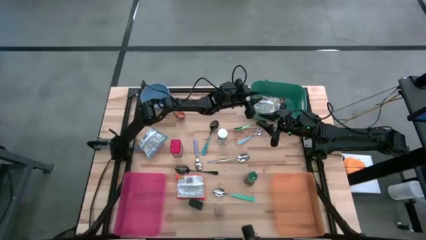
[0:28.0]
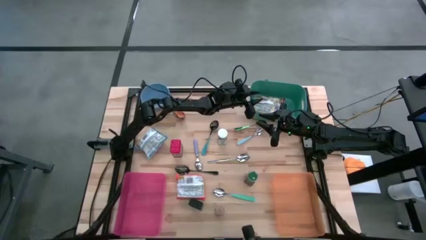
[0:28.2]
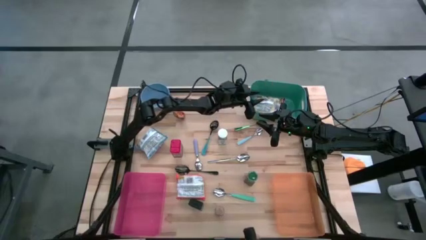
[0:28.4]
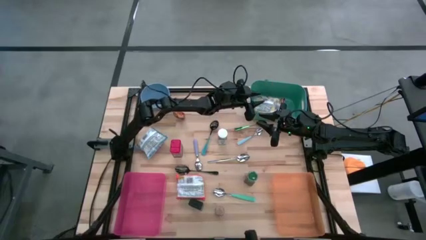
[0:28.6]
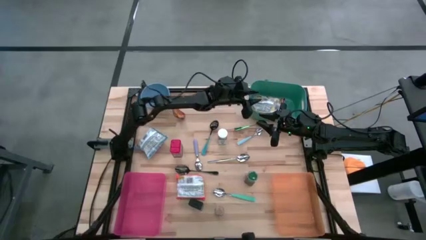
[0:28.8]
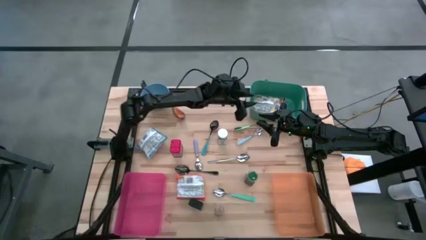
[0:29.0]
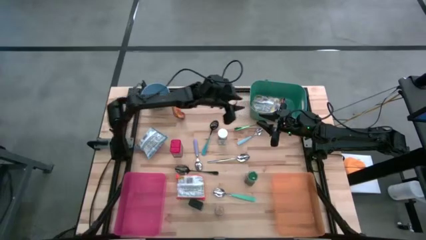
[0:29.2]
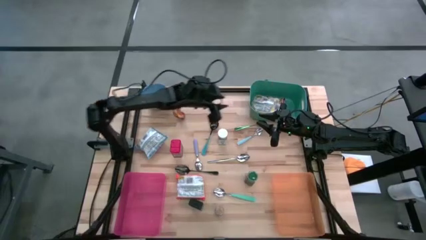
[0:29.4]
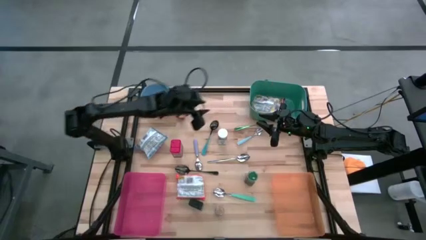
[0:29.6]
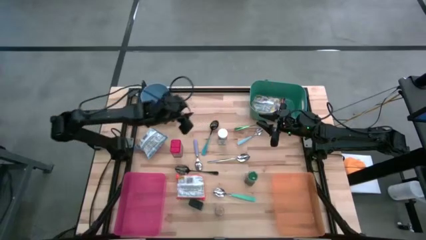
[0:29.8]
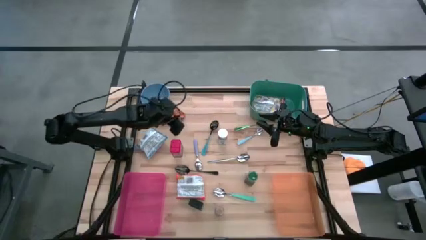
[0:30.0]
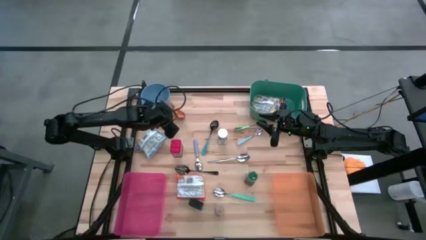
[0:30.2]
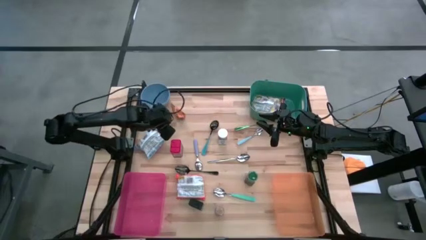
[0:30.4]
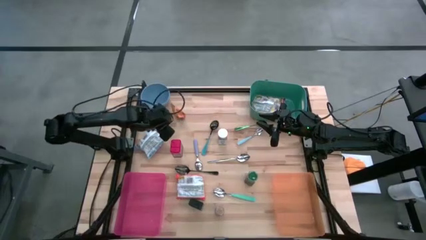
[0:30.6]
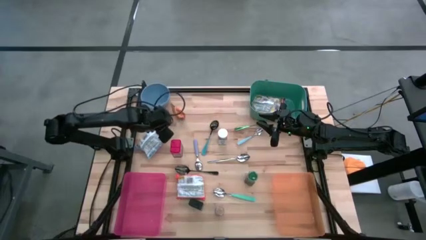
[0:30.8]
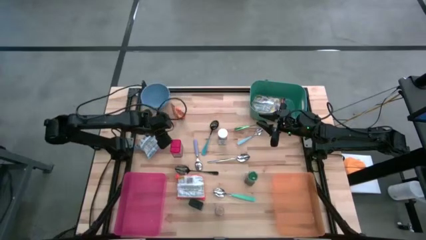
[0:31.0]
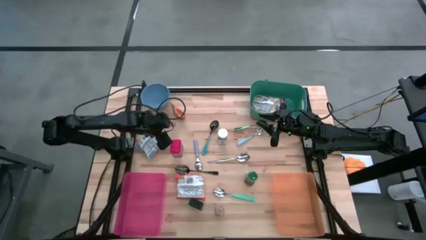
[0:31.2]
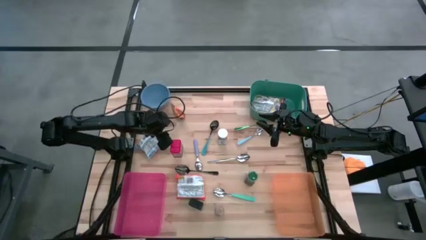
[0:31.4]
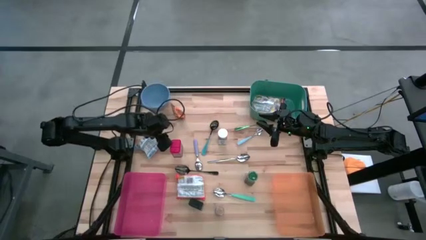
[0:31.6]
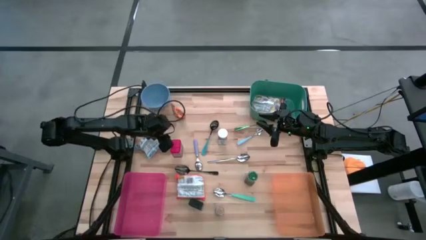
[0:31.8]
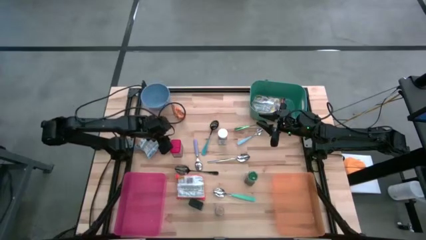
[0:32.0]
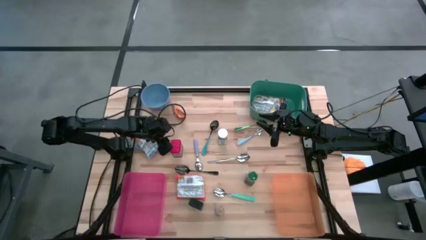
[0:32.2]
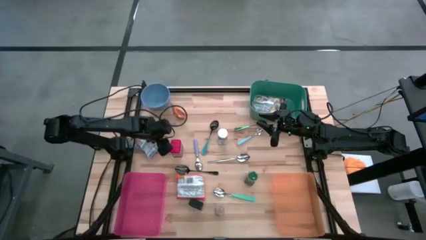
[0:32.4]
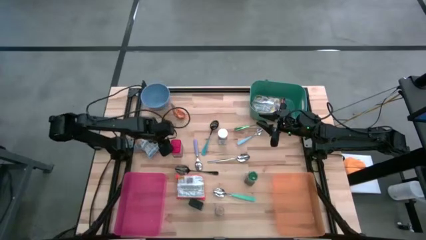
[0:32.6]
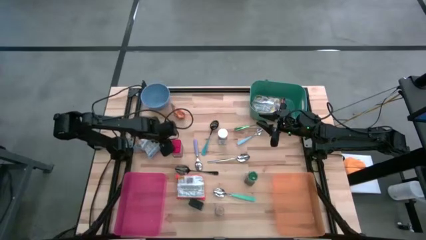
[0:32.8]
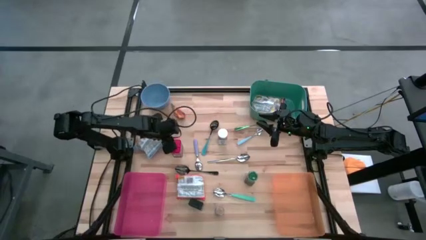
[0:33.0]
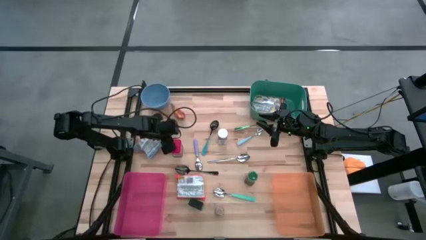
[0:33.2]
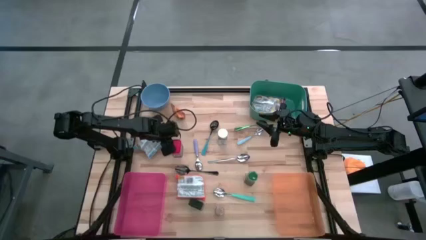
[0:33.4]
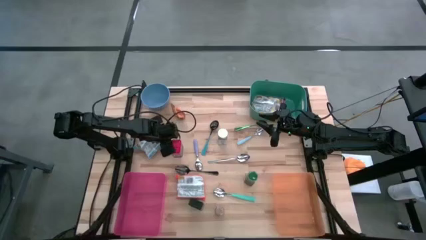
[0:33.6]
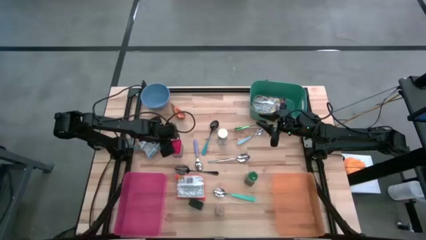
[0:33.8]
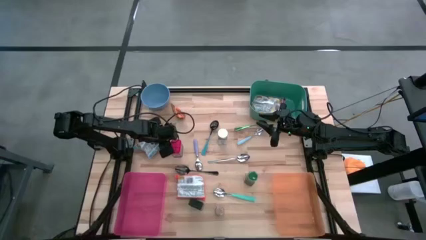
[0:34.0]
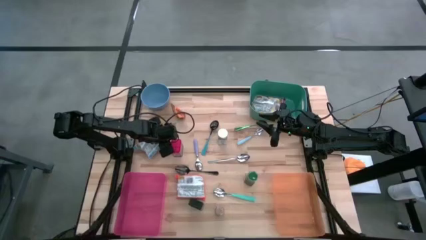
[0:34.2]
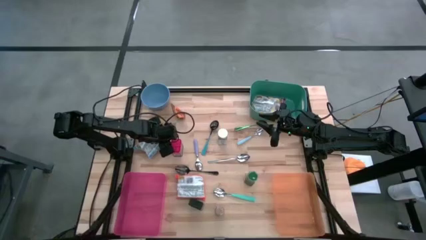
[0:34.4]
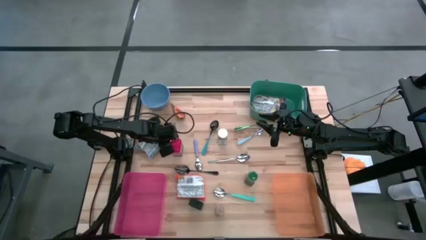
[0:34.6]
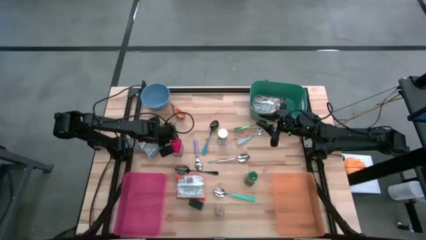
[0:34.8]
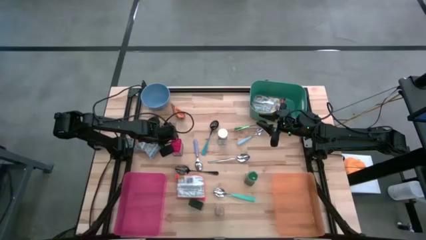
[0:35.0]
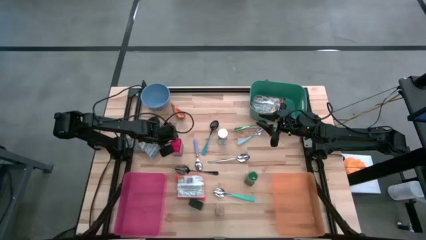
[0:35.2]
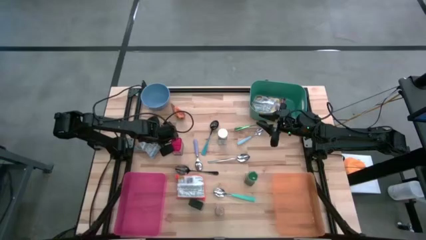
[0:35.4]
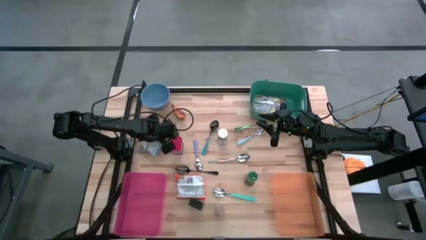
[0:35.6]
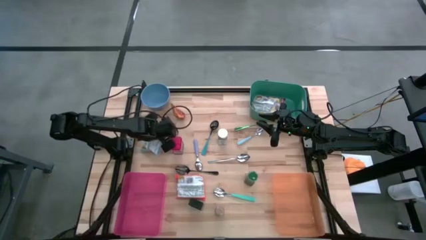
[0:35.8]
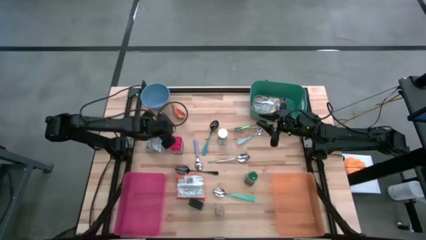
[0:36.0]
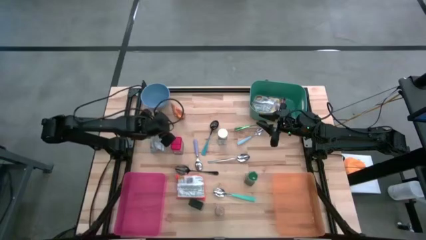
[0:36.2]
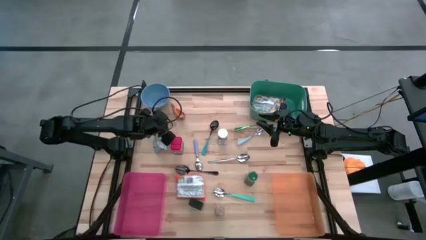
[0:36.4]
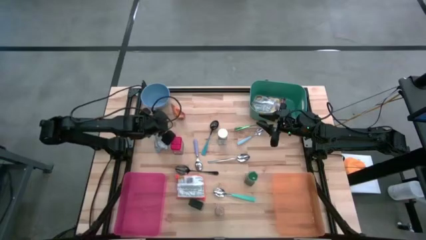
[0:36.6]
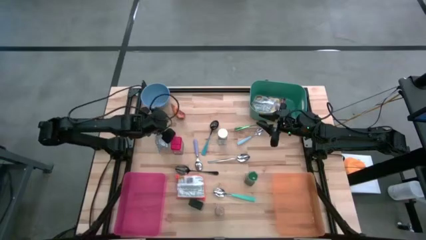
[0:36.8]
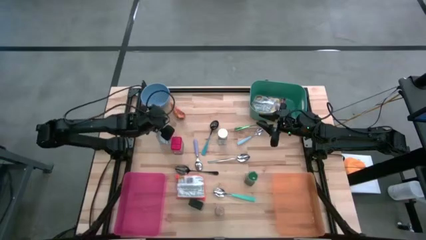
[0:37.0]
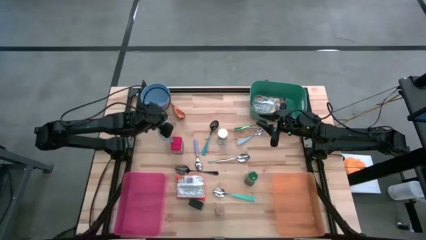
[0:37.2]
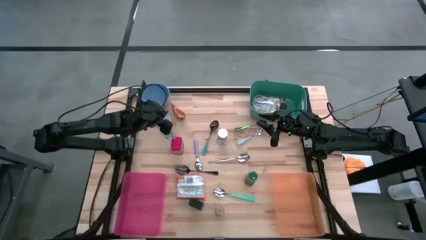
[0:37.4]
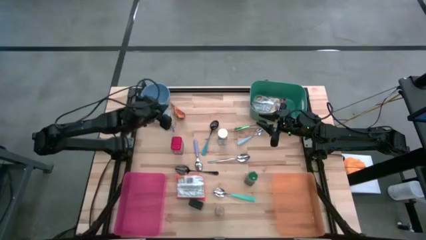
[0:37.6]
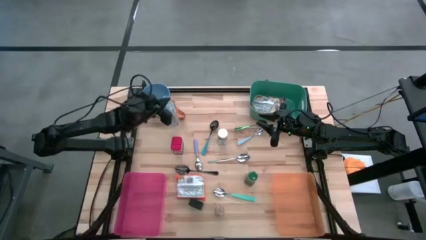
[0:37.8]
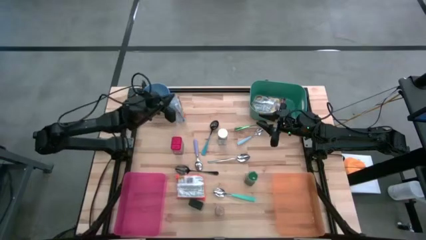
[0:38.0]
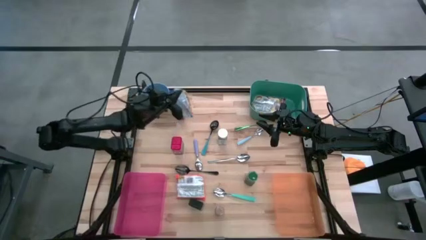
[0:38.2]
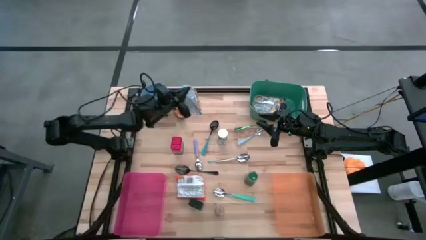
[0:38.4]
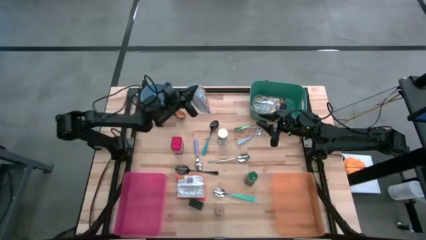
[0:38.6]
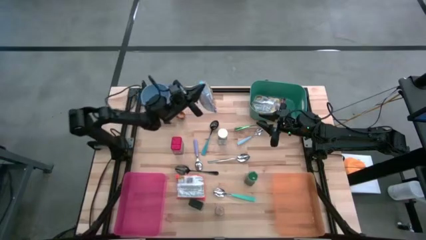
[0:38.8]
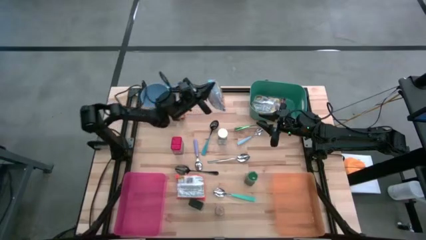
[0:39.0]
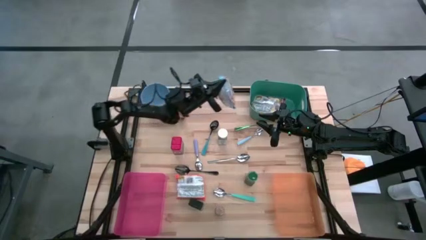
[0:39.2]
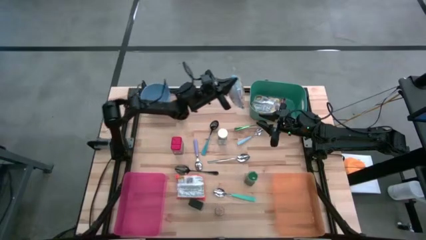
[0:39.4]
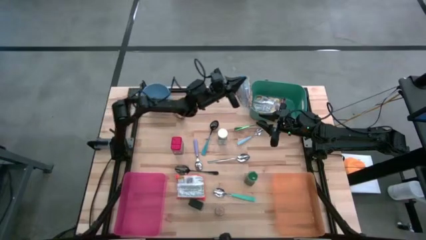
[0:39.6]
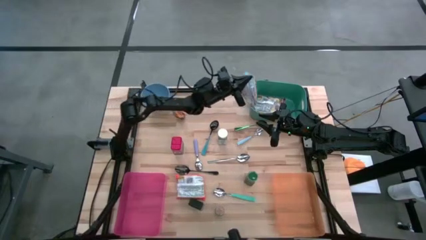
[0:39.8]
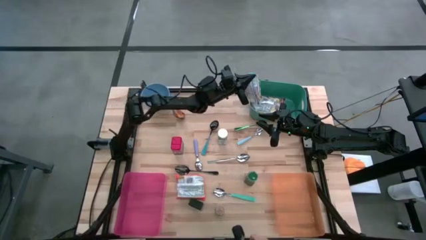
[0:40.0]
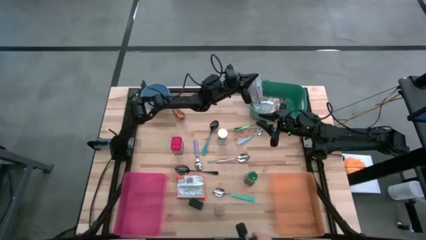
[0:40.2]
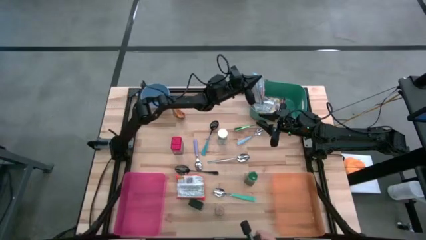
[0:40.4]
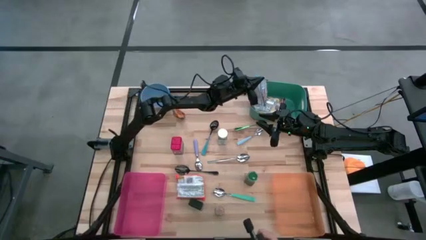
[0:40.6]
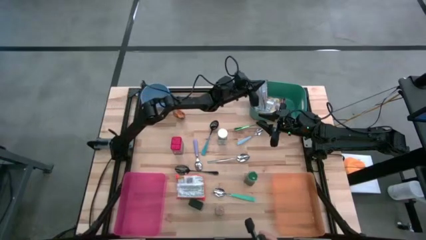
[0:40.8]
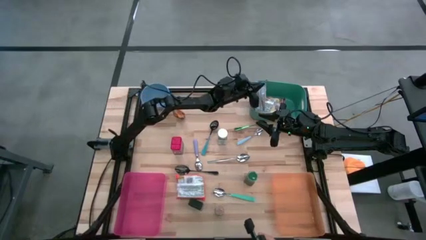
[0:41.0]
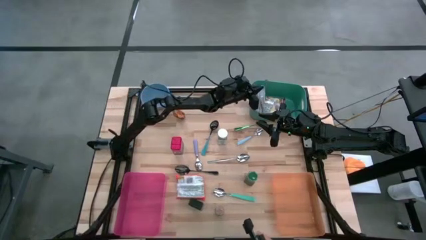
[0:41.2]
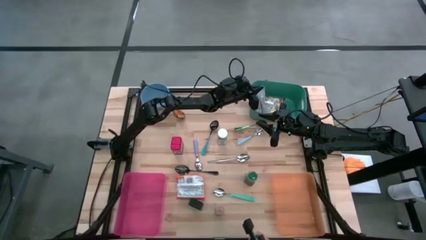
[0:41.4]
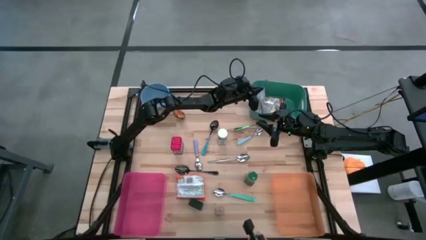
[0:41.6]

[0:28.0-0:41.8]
Put the blue noodle pack into the green bin
